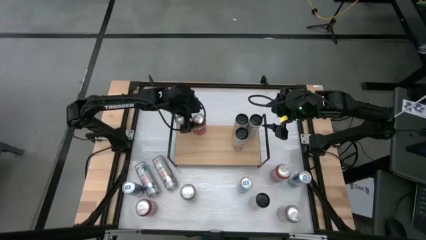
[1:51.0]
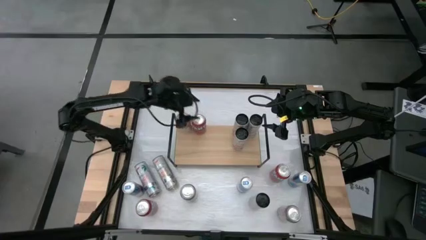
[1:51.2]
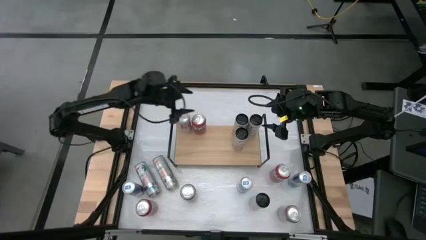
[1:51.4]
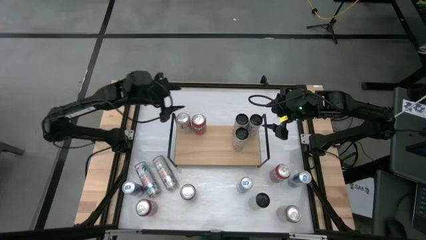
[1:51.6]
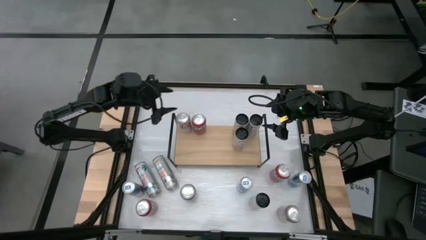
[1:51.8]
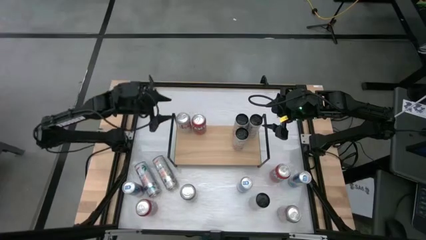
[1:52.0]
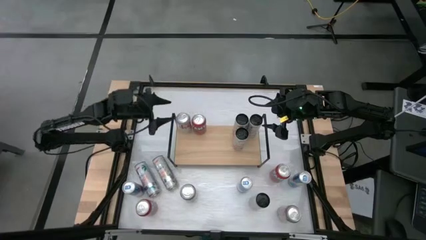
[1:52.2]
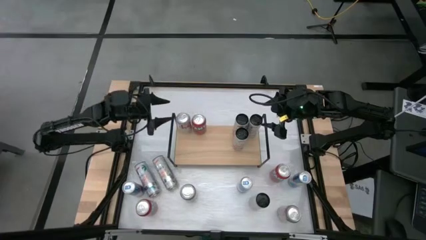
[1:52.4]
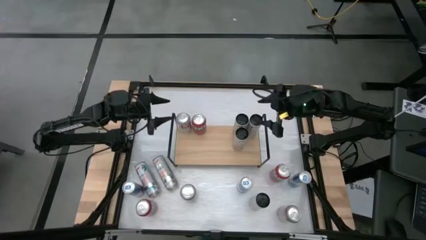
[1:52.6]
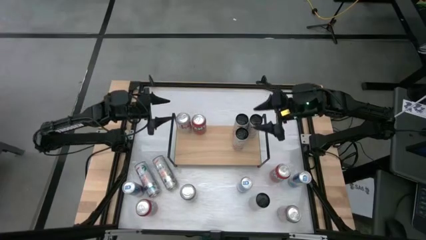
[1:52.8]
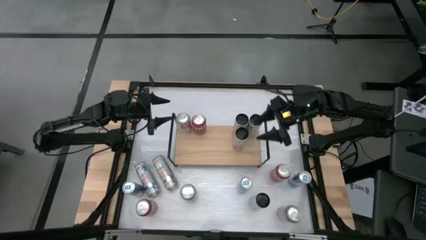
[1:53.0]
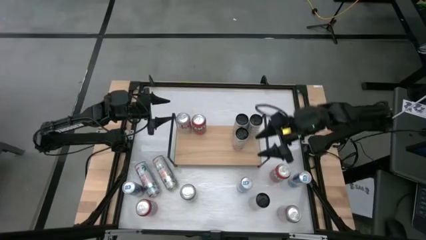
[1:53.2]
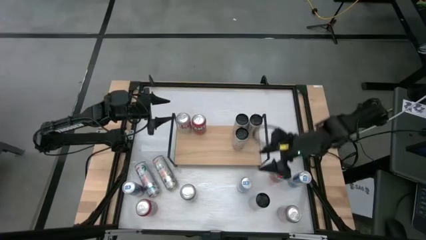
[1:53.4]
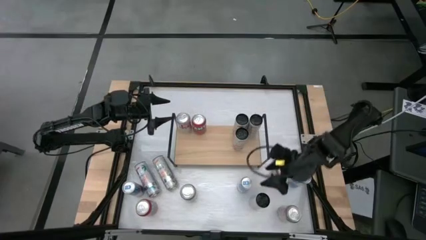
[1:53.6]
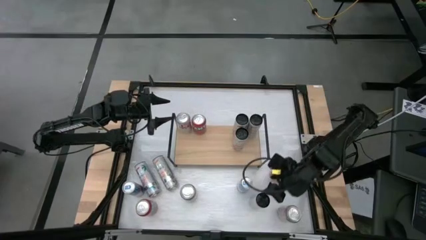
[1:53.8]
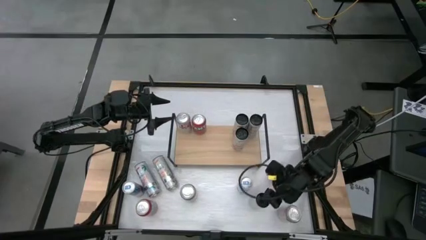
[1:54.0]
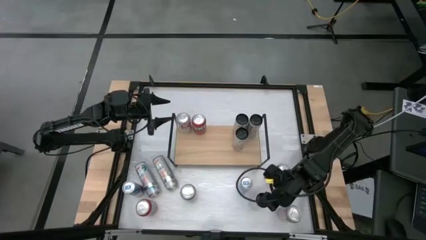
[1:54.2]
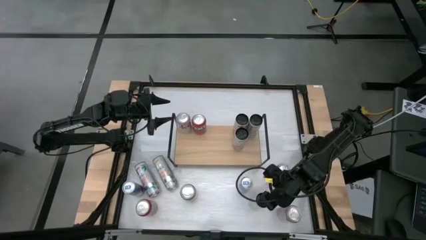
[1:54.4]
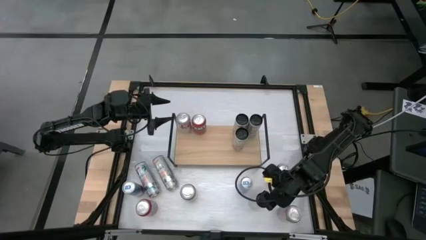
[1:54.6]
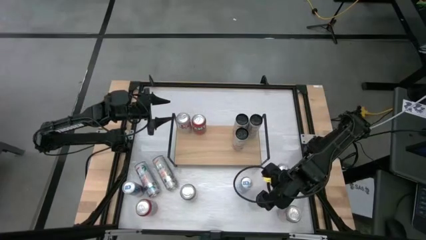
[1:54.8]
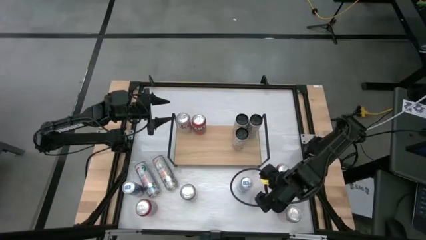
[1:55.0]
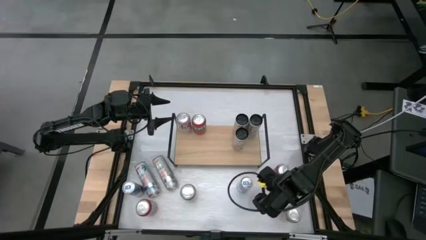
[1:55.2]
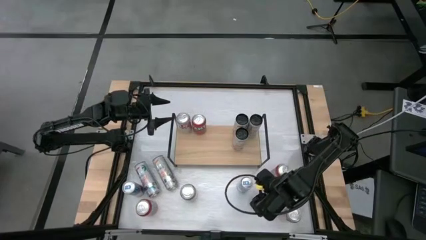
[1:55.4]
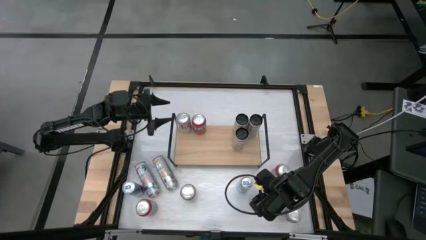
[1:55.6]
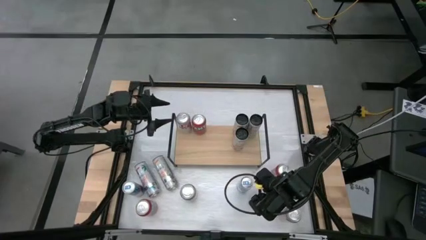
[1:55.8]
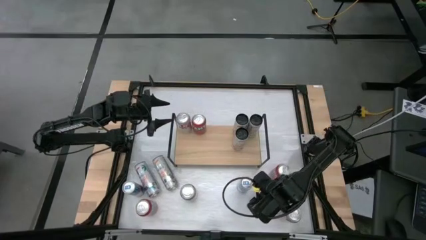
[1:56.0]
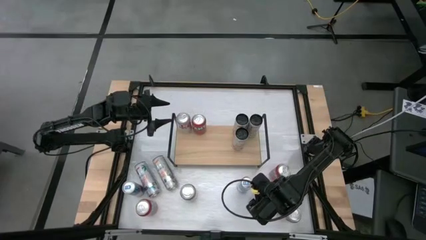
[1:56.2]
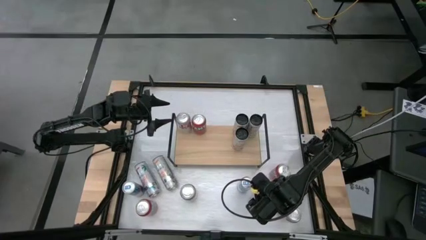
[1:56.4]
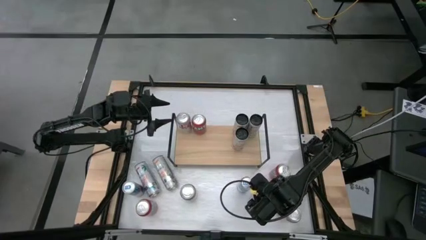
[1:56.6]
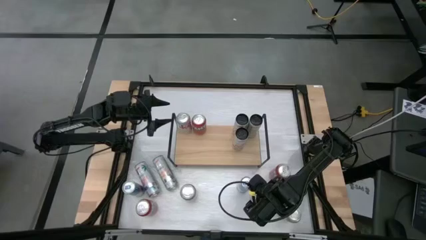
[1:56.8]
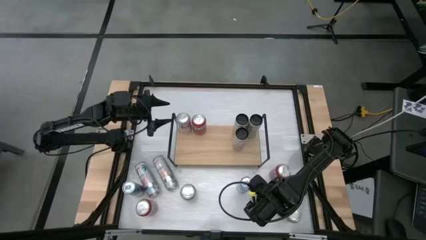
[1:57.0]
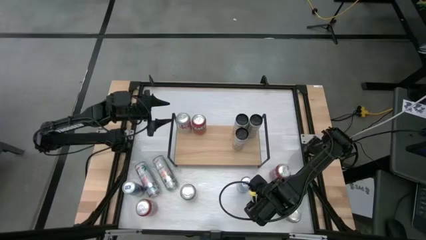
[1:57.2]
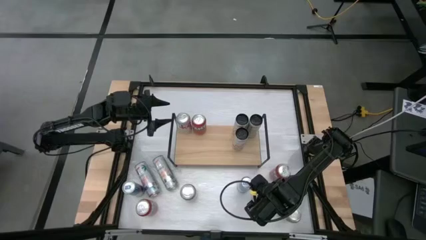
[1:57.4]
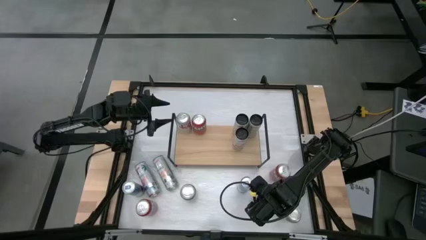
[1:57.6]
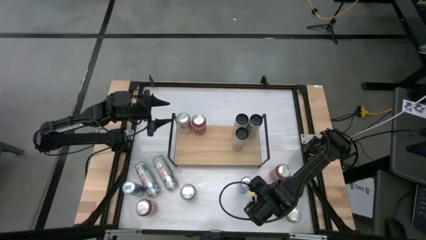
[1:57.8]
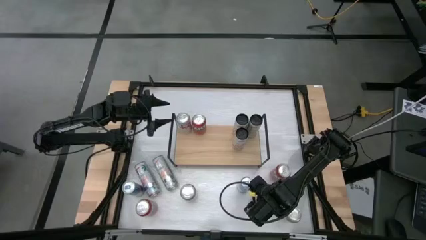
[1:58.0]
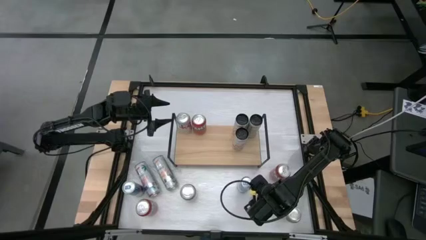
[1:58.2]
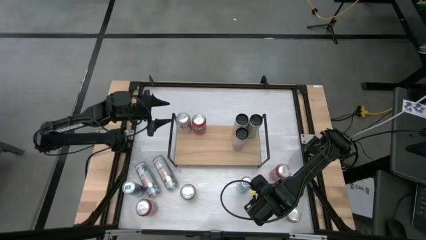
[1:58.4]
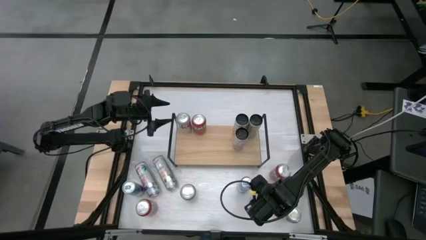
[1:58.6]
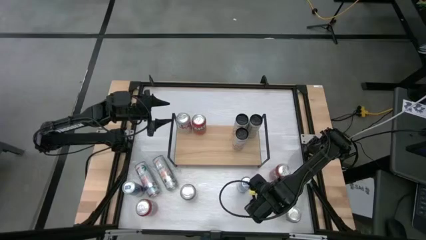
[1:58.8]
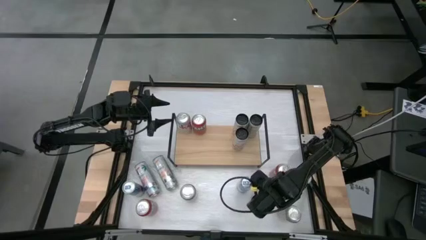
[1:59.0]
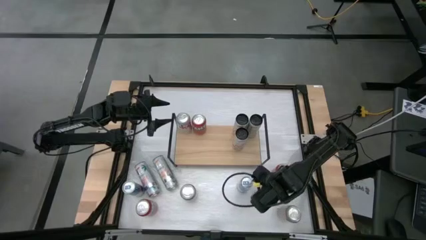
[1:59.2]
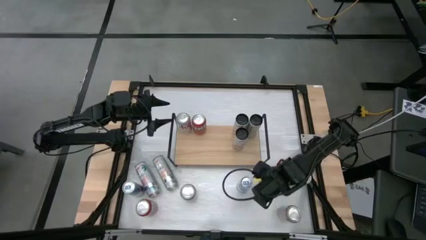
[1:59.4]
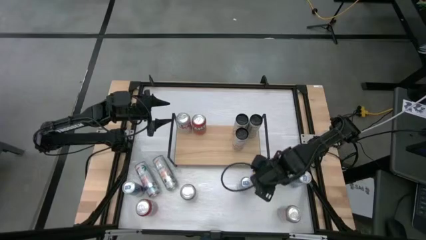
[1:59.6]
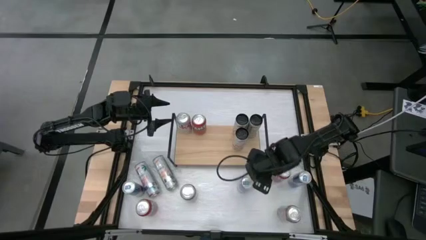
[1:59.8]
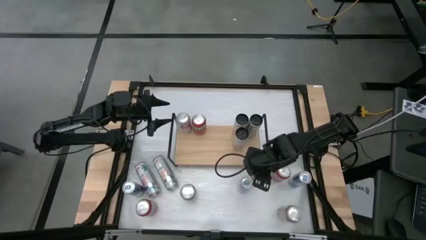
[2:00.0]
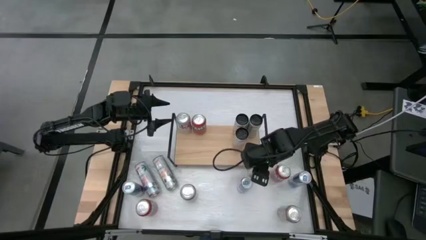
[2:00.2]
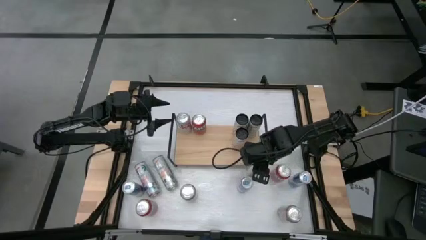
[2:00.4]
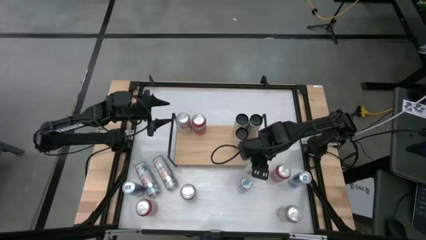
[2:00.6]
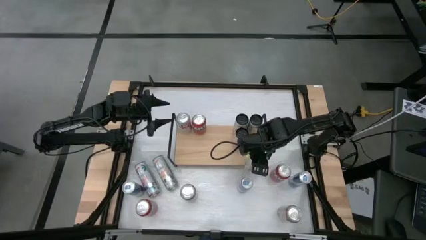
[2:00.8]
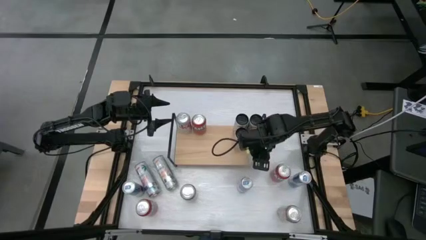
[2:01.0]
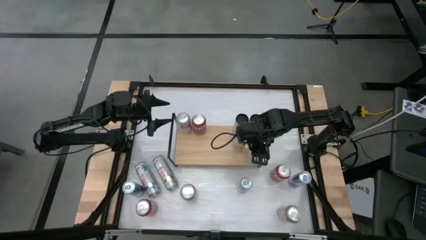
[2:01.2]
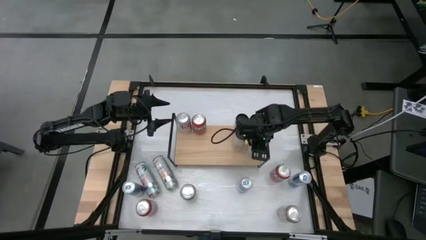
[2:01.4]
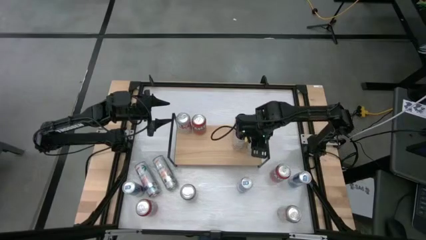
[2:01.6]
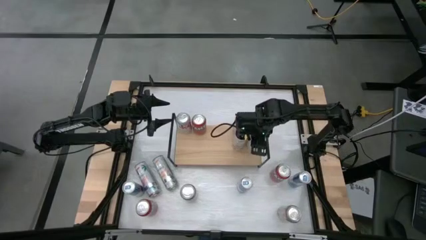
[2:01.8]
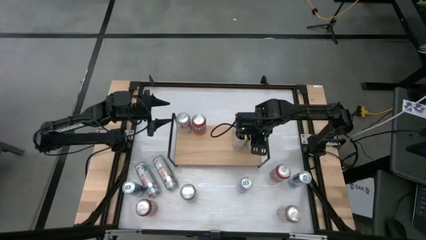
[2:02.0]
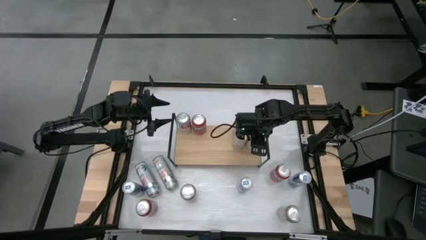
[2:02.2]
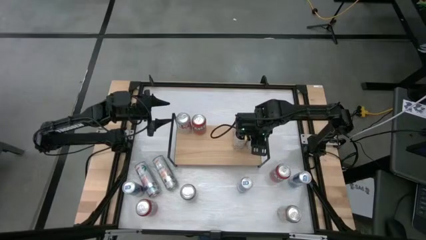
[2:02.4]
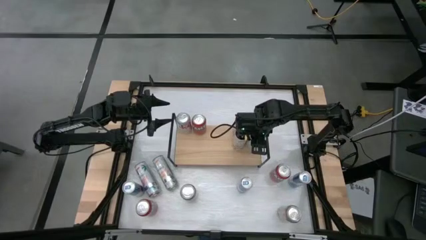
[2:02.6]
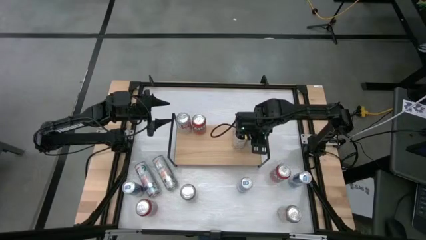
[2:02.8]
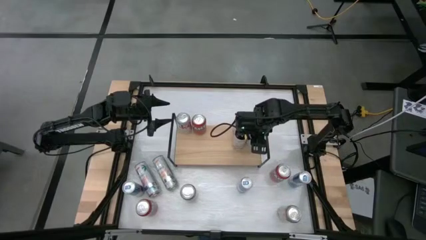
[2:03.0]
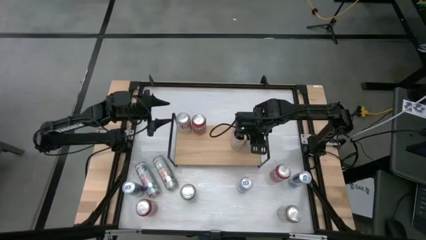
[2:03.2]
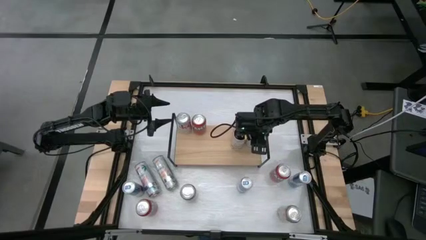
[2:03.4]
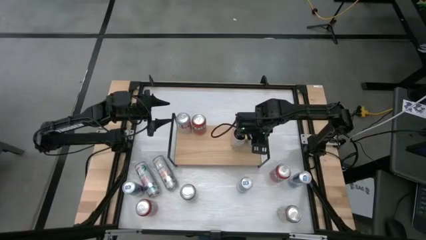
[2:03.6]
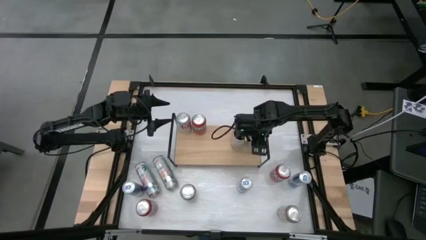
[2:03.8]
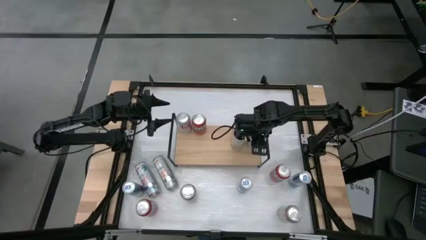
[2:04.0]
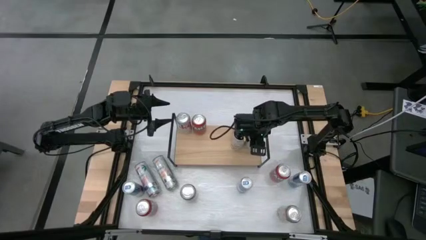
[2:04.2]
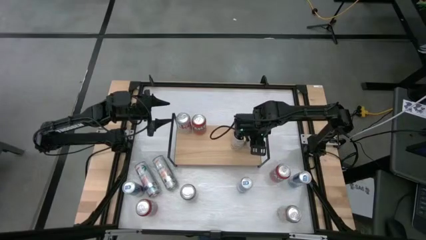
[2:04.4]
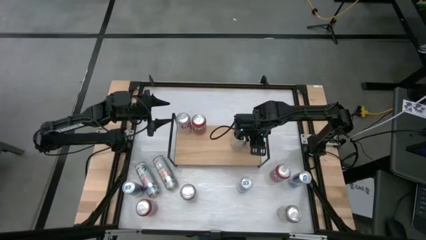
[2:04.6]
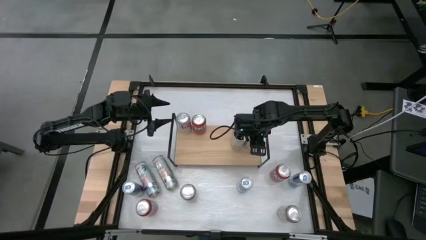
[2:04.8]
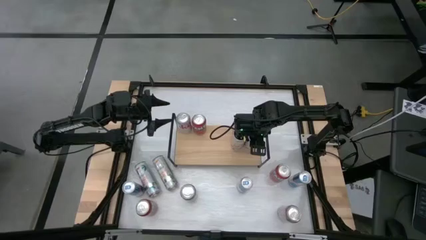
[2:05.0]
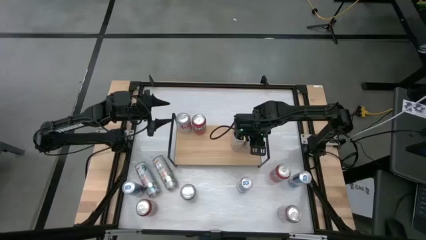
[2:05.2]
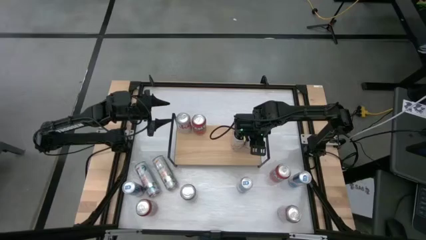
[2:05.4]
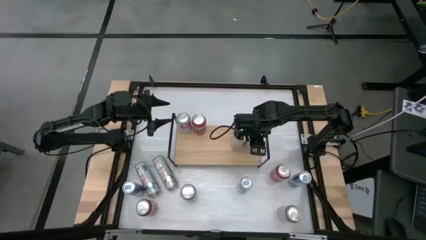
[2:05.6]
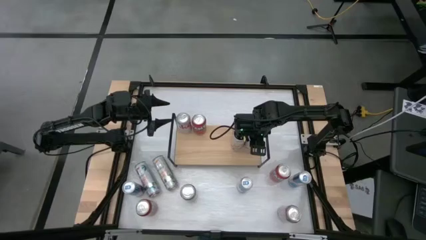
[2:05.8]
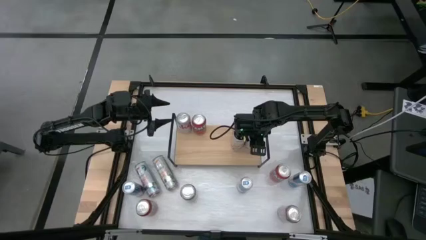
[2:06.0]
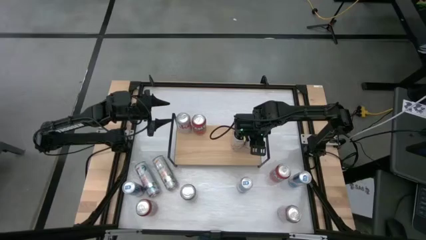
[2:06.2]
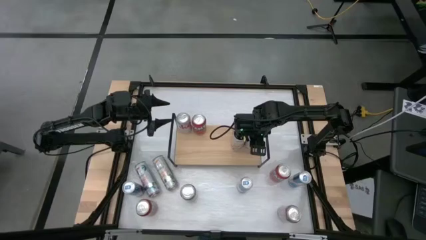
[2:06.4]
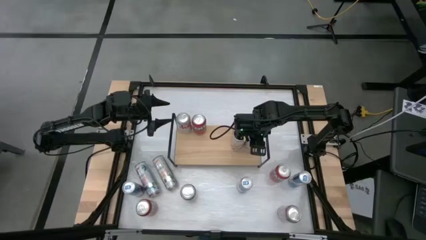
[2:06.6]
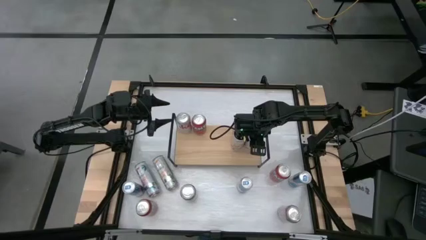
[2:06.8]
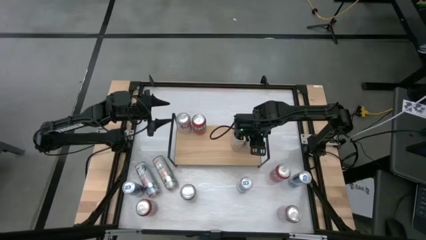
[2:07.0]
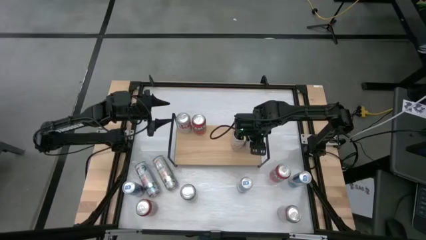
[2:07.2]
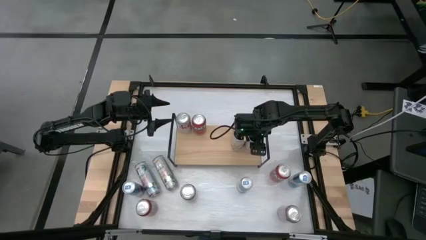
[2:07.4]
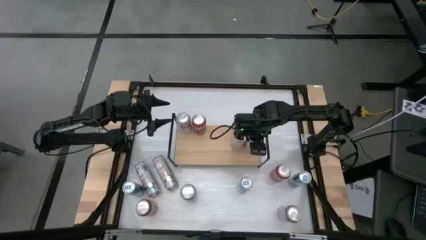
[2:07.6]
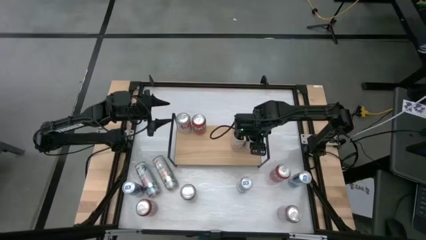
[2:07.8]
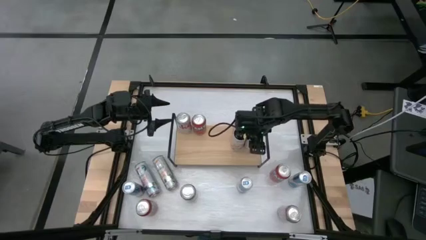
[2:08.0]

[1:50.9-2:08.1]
Task: Place canned beverage on shelf
Put the right white-yellow soda can on the shelf aligned with the other white-yellow soda can
